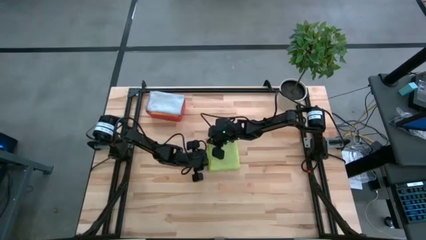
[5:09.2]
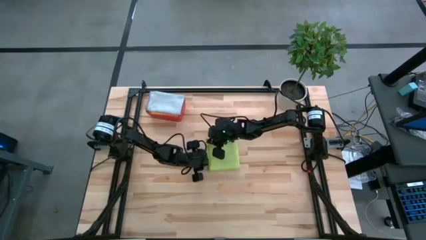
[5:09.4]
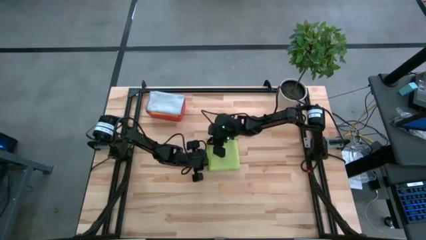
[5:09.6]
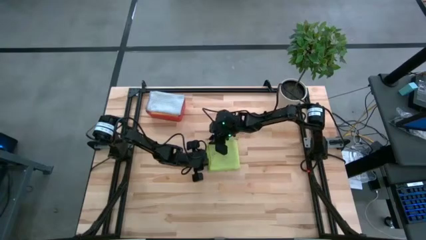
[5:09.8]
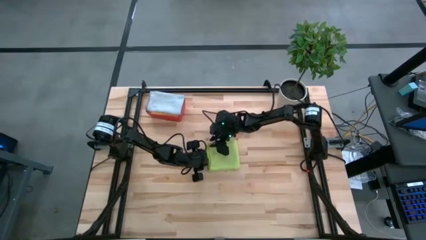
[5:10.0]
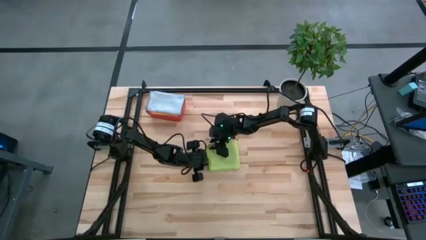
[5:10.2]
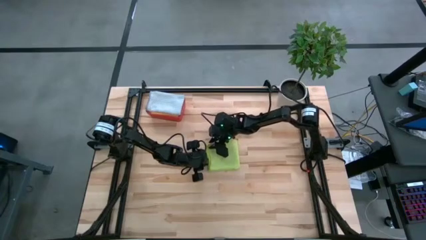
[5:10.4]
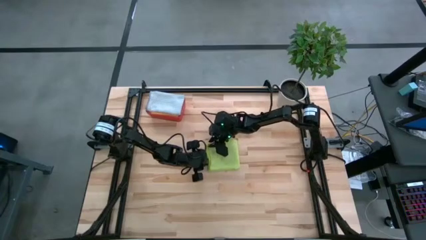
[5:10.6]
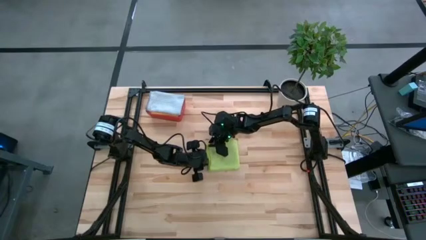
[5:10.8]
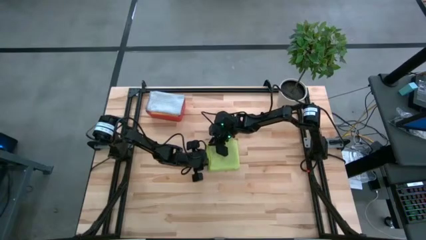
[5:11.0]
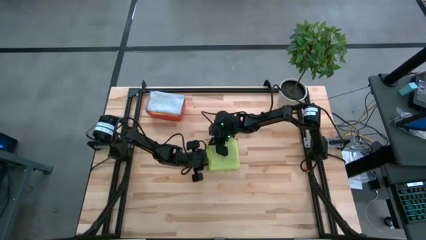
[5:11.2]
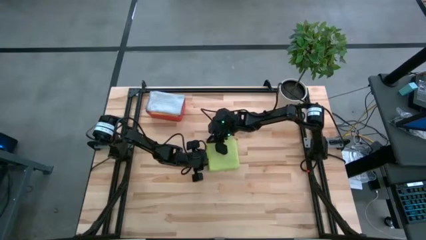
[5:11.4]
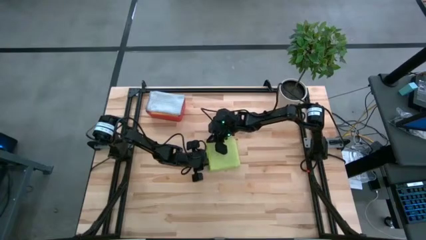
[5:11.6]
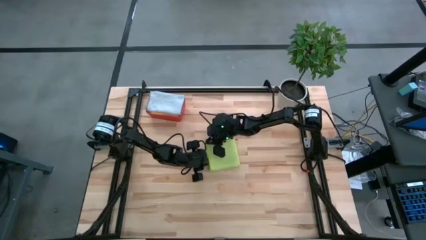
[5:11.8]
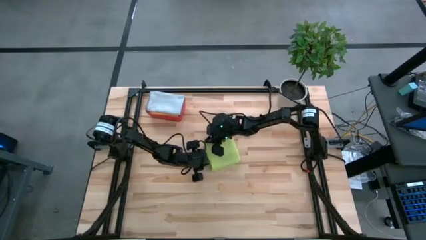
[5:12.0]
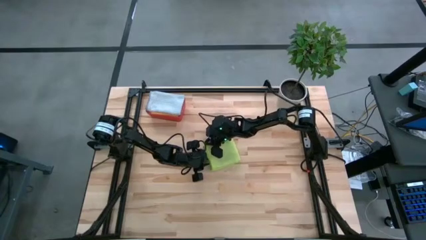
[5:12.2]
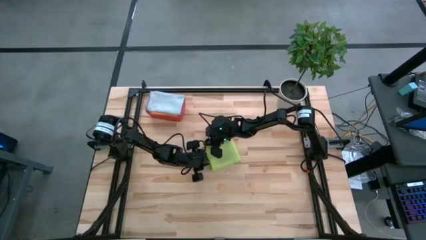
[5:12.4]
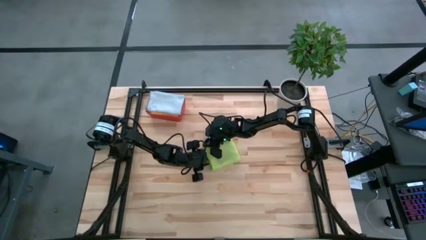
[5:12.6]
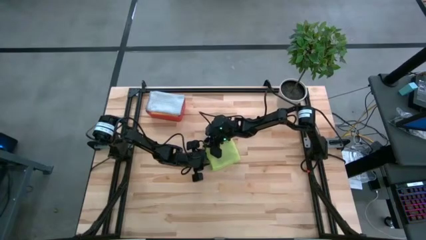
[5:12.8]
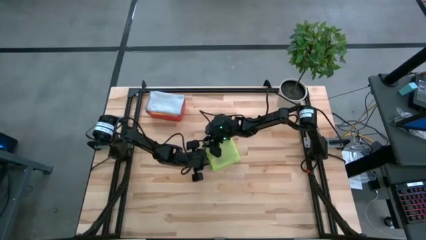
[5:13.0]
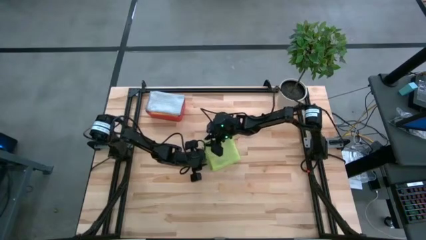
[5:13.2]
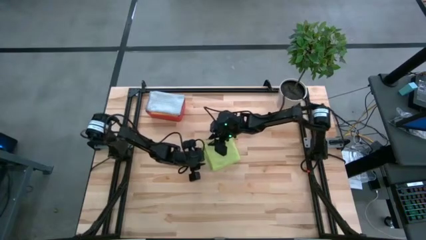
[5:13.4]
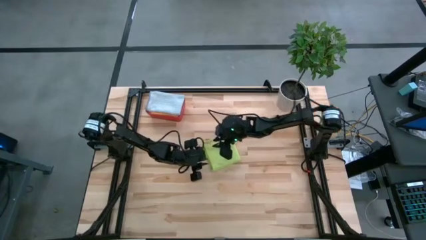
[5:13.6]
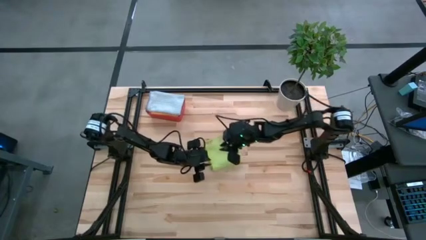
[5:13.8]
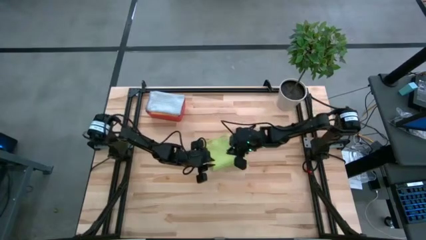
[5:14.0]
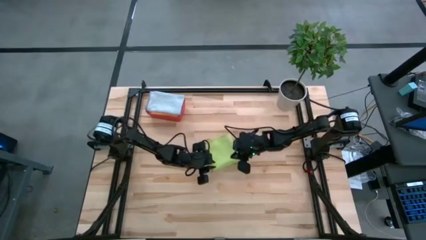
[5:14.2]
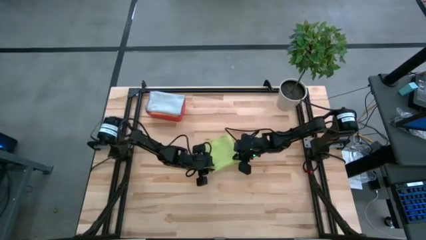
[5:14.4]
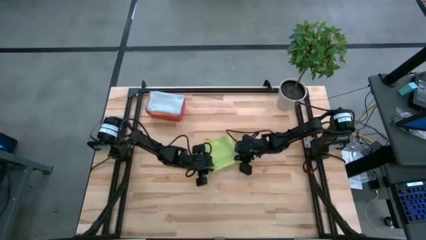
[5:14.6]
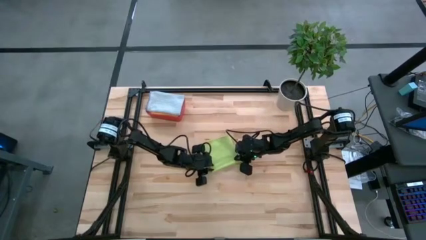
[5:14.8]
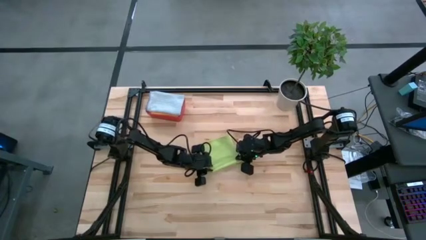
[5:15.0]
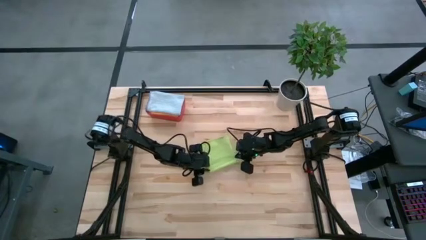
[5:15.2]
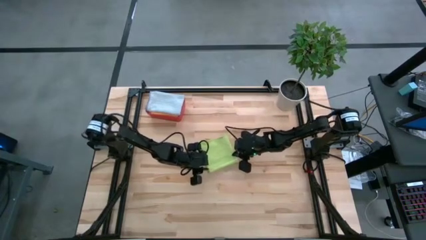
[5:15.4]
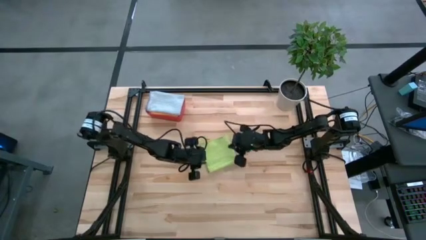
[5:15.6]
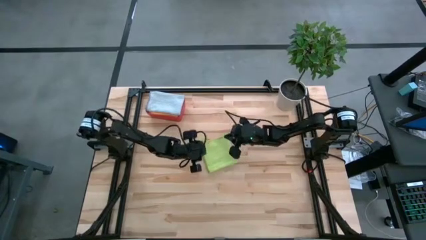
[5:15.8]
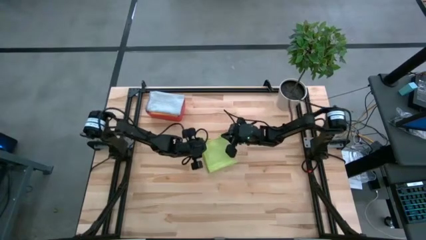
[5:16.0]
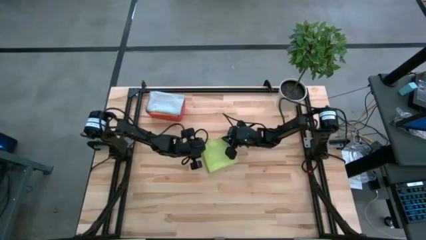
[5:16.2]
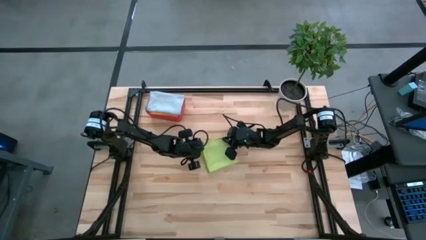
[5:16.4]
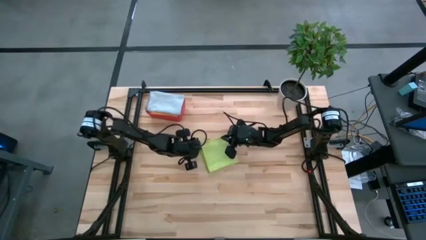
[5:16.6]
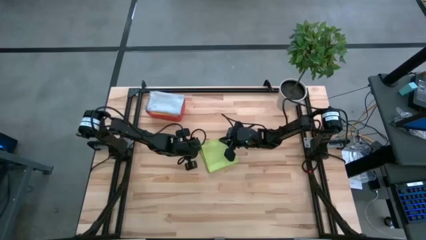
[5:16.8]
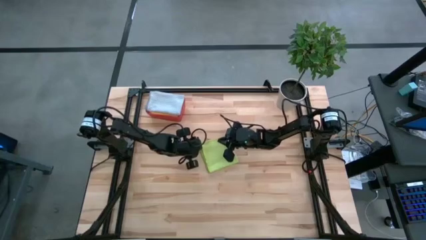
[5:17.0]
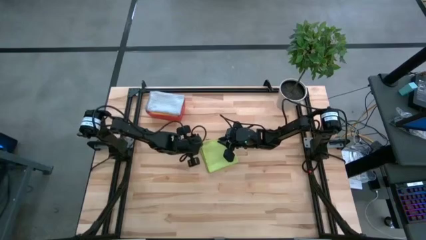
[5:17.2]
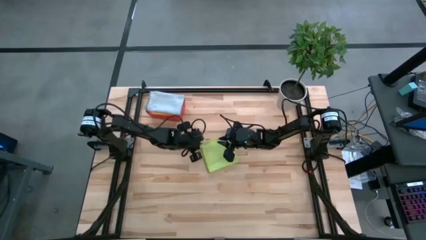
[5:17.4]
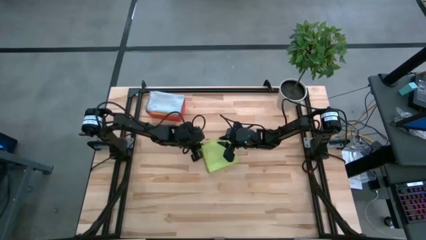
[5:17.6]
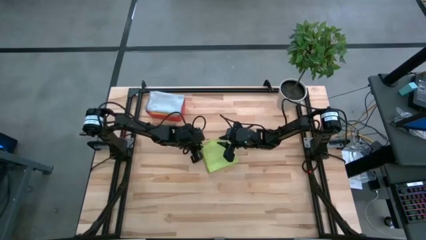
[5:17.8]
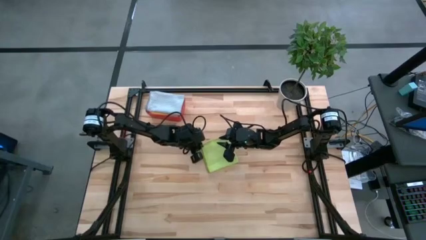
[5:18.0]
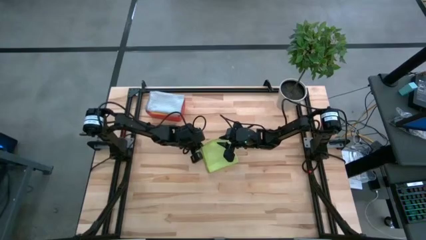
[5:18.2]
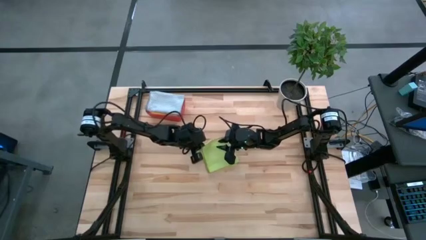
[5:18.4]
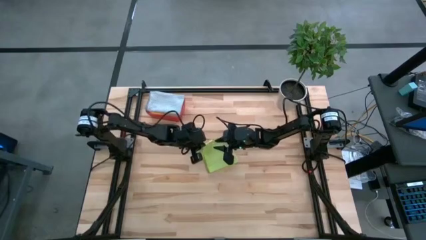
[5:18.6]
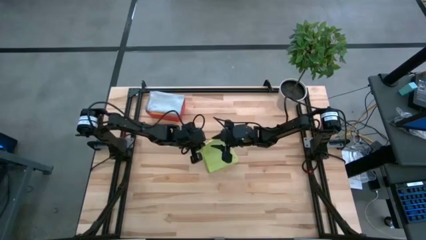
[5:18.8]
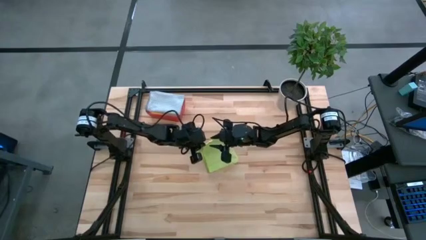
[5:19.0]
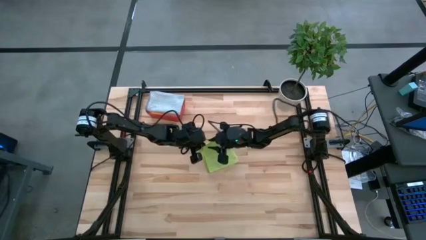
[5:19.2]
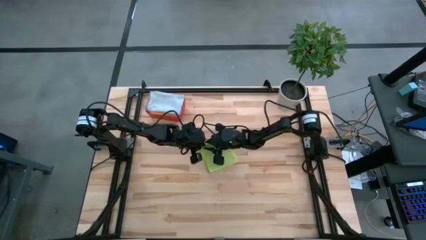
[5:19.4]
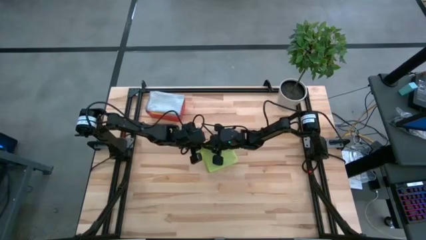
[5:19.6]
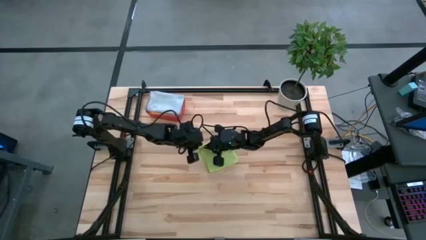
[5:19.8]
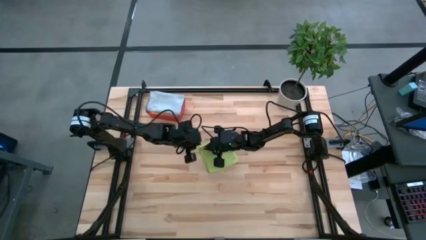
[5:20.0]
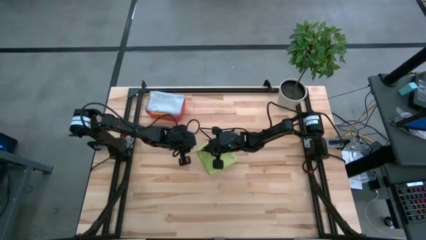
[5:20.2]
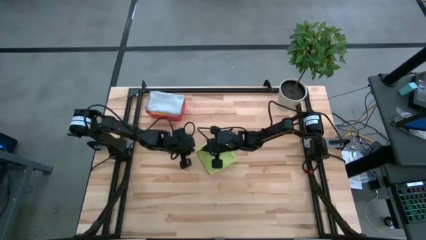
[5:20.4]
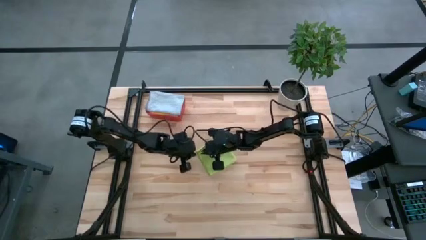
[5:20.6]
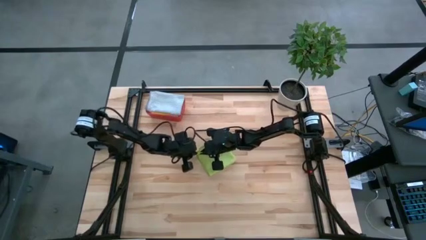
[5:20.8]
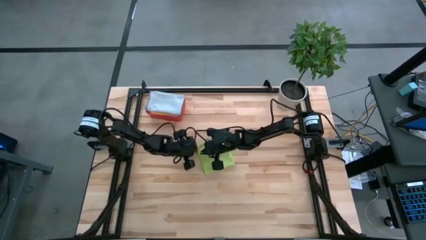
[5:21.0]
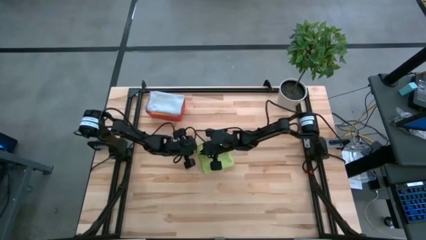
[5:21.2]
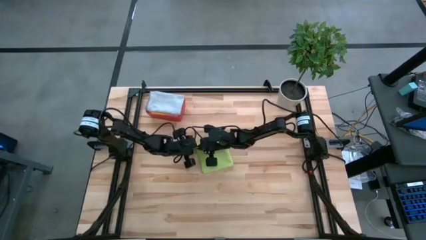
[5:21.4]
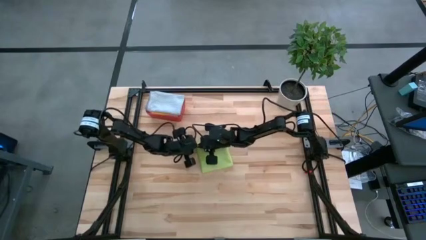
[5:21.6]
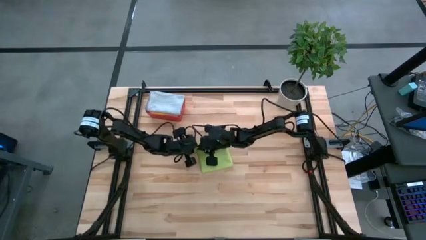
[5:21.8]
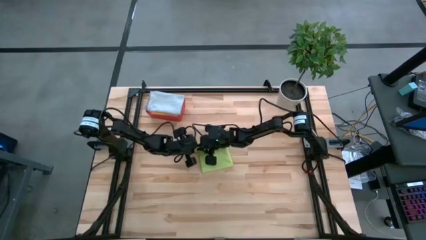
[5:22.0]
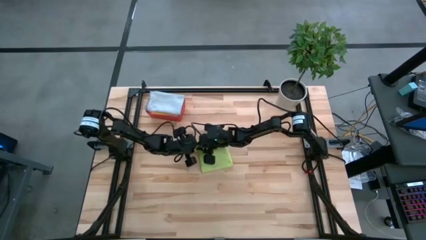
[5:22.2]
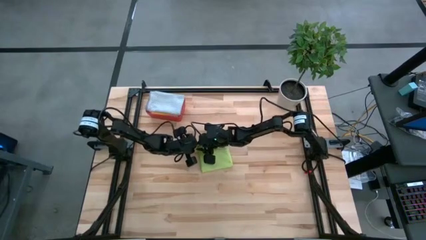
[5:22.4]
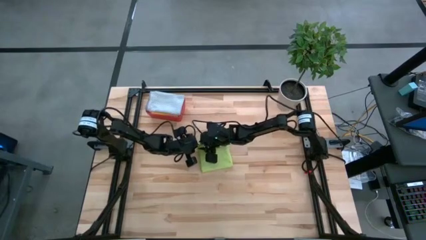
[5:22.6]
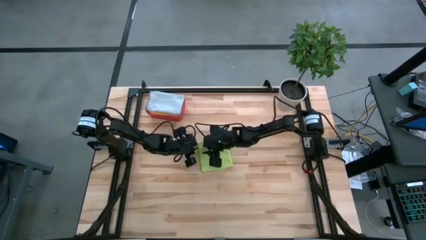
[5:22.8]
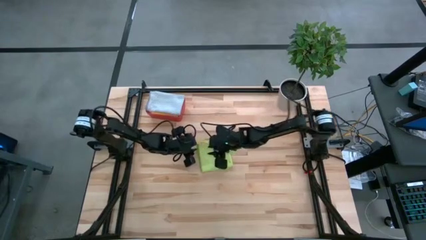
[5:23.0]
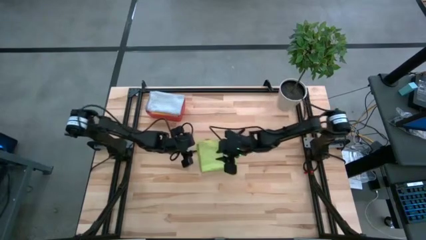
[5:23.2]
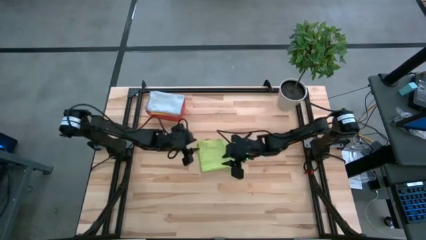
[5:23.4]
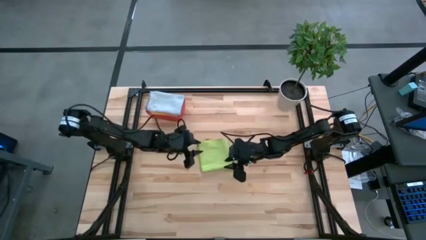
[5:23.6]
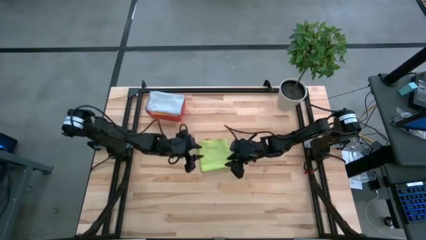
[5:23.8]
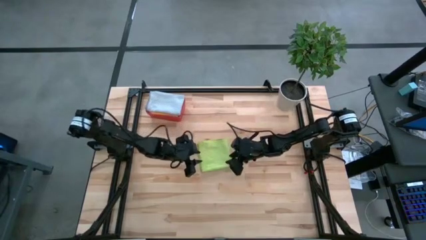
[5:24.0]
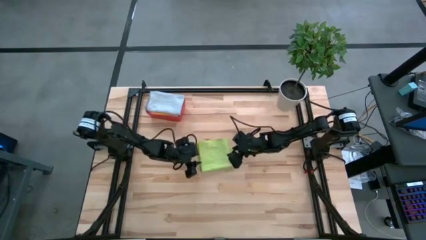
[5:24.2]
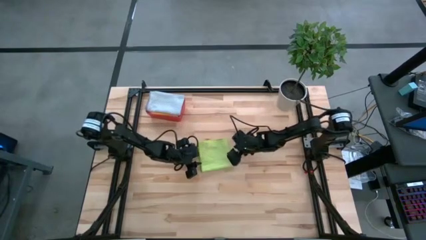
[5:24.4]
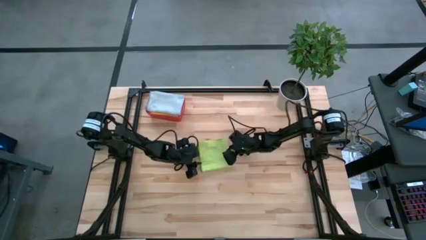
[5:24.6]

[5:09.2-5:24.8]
Task: Fold microfiber towels
Fold the light green microfiber cloth

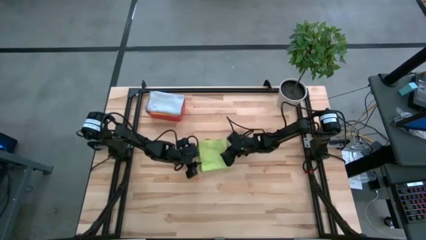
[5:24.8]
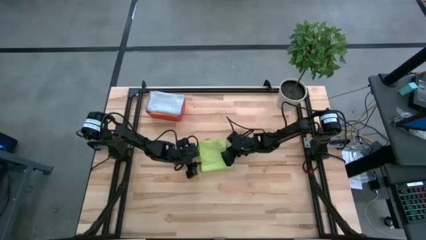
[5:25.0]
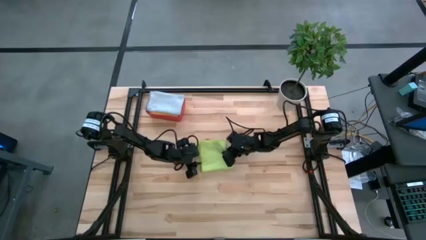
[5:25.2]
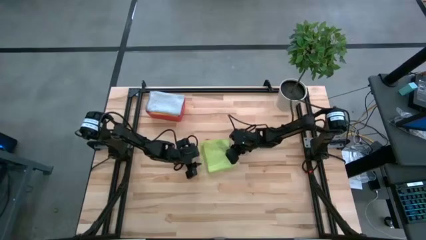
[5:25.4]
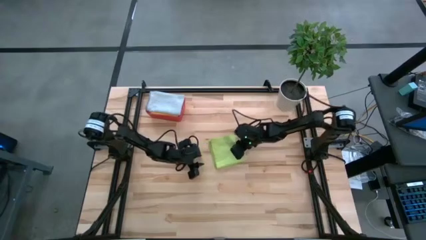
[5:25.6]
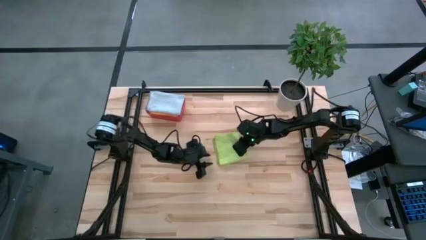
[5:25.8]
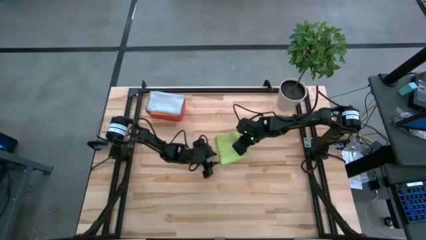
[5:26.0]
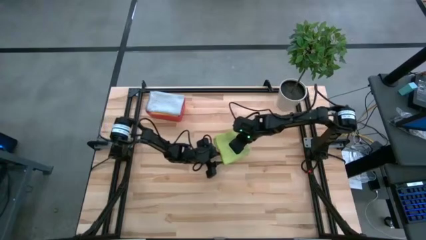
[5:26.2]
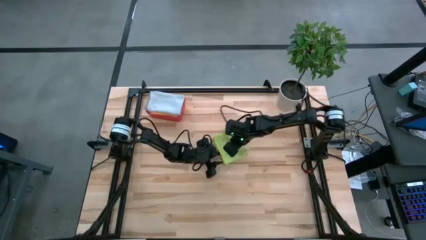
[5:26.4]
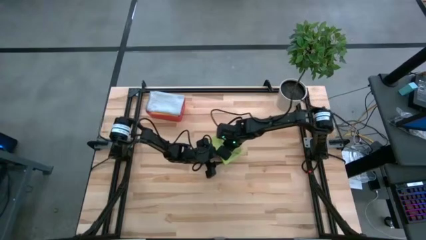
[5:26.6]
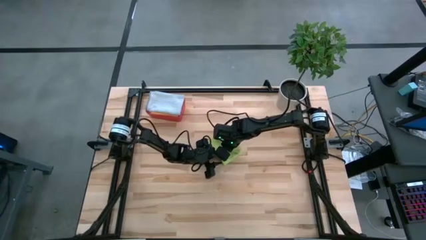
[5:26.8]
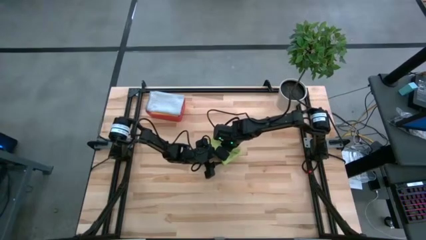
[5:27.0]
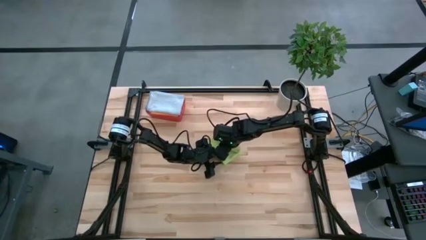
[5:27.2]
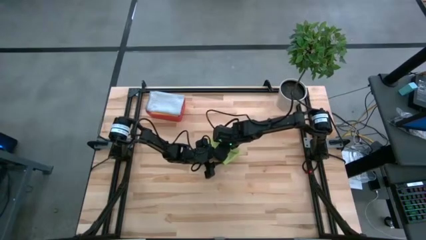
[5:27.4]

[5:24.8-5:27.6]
Fold the light green microfiber cloth
